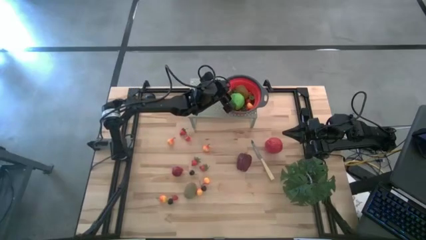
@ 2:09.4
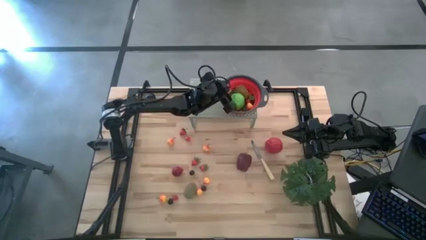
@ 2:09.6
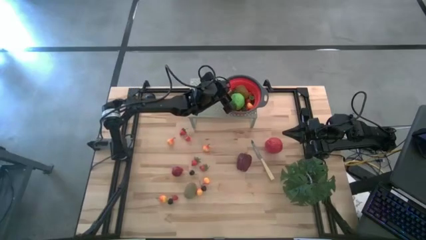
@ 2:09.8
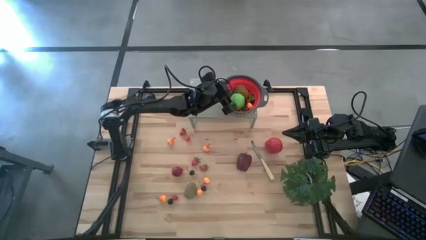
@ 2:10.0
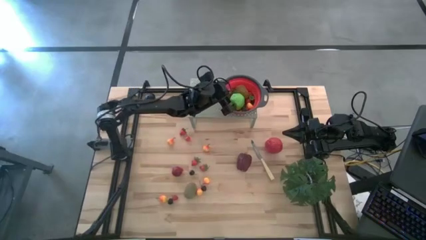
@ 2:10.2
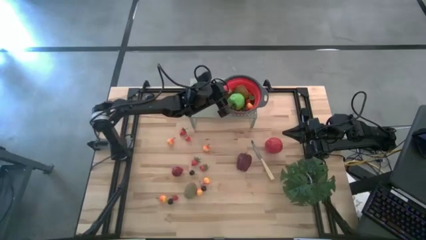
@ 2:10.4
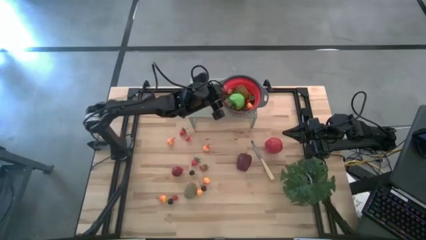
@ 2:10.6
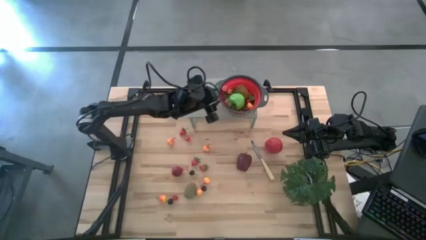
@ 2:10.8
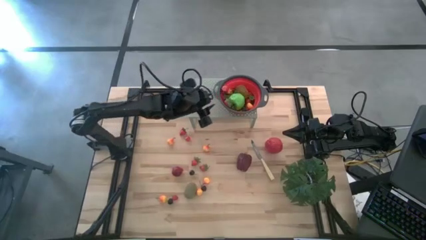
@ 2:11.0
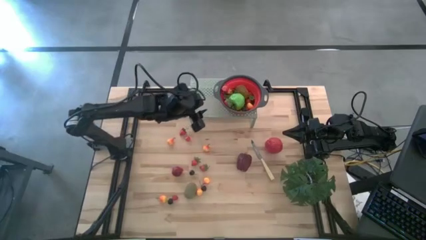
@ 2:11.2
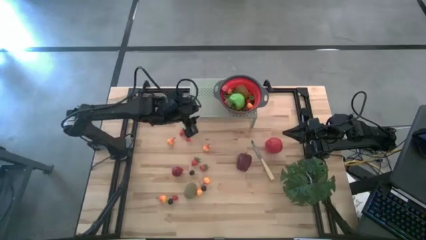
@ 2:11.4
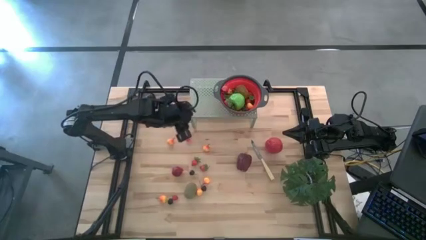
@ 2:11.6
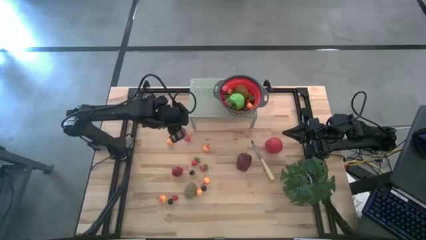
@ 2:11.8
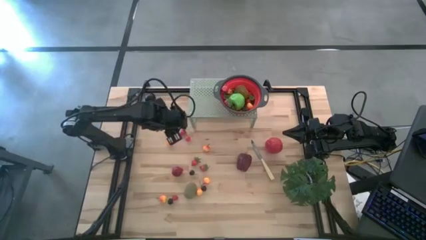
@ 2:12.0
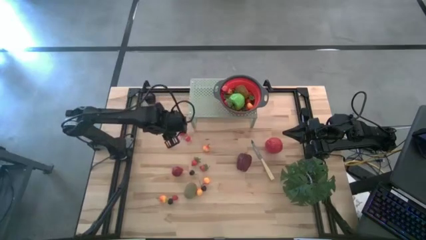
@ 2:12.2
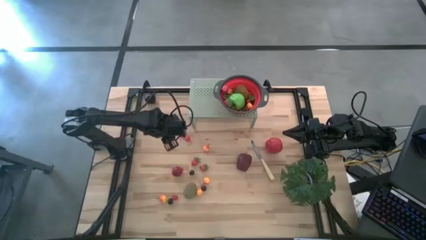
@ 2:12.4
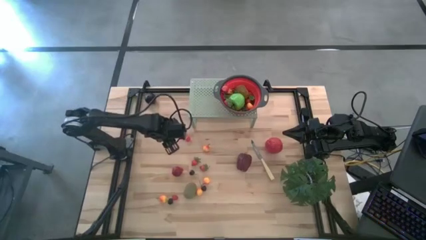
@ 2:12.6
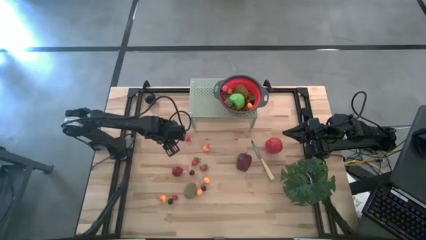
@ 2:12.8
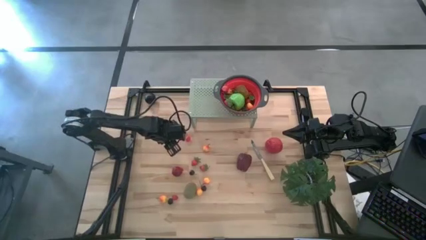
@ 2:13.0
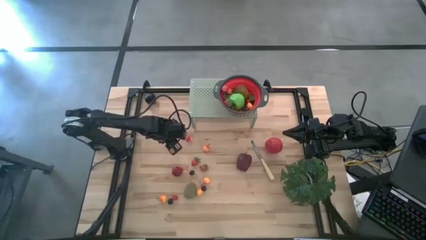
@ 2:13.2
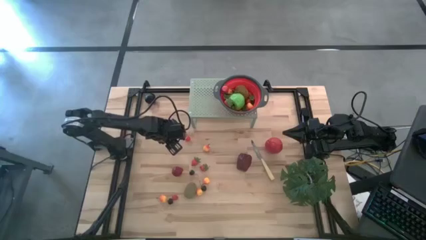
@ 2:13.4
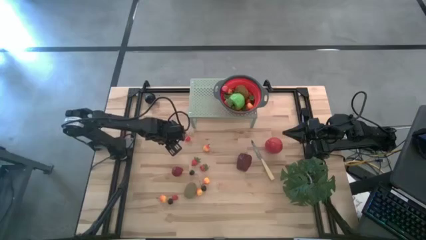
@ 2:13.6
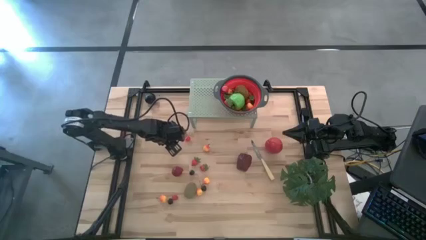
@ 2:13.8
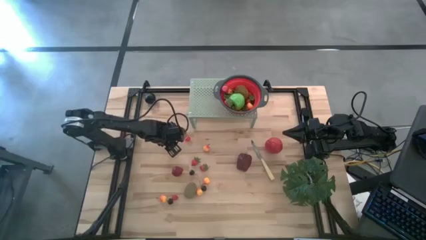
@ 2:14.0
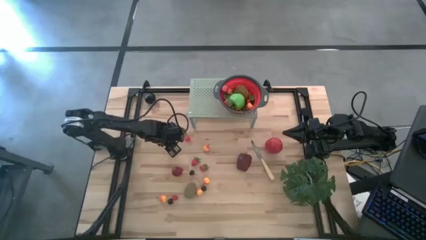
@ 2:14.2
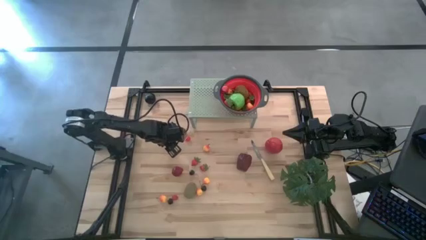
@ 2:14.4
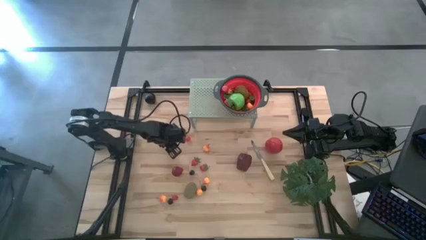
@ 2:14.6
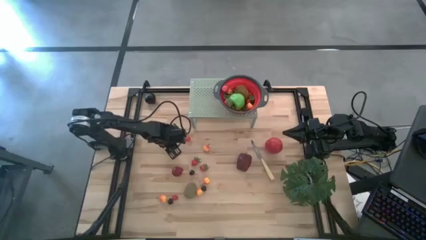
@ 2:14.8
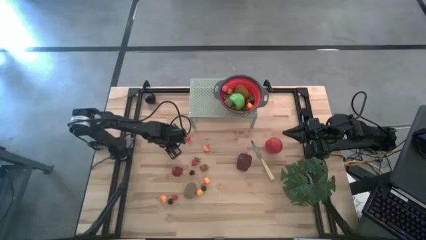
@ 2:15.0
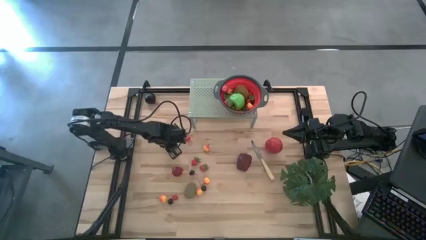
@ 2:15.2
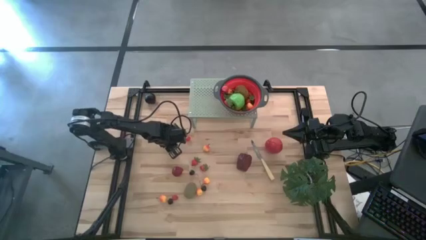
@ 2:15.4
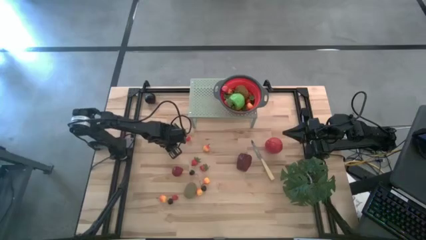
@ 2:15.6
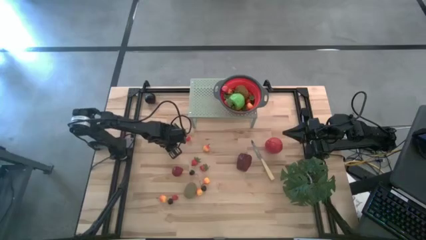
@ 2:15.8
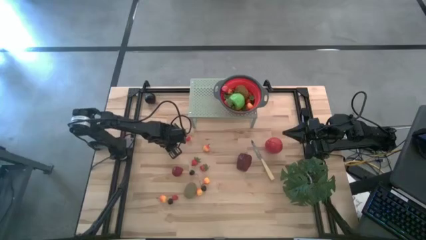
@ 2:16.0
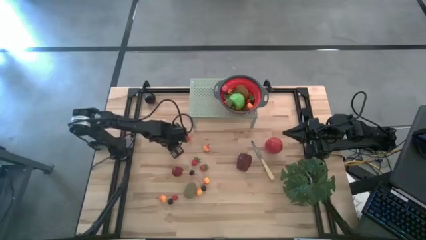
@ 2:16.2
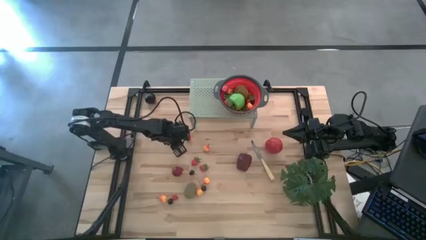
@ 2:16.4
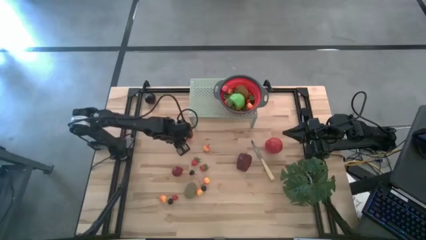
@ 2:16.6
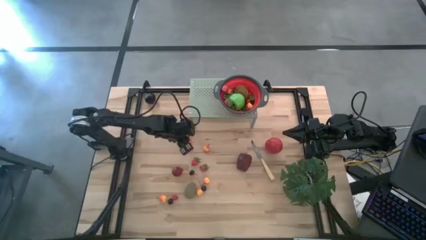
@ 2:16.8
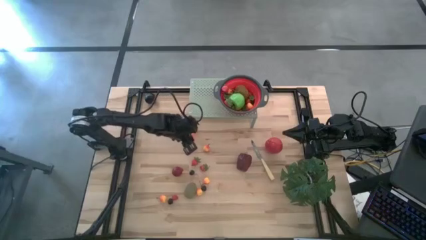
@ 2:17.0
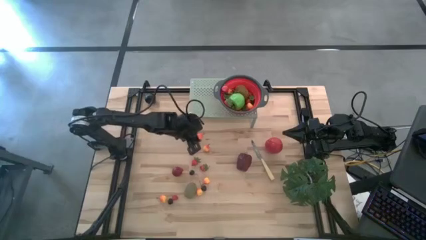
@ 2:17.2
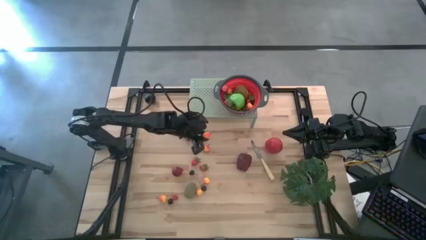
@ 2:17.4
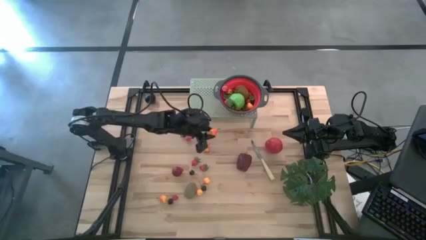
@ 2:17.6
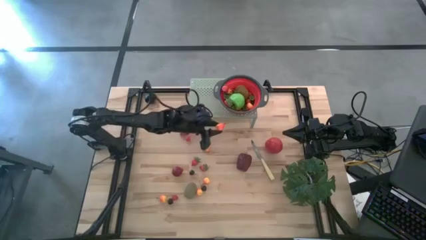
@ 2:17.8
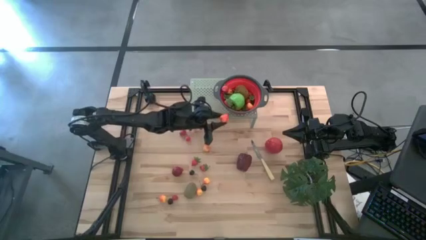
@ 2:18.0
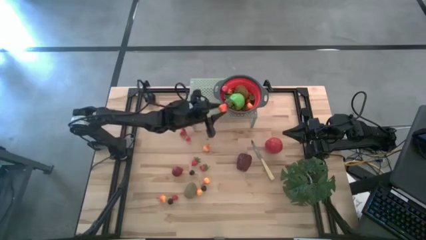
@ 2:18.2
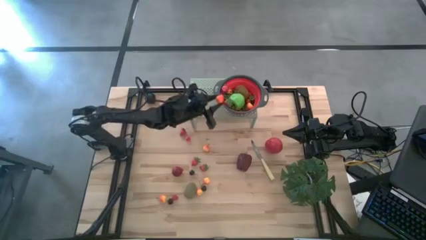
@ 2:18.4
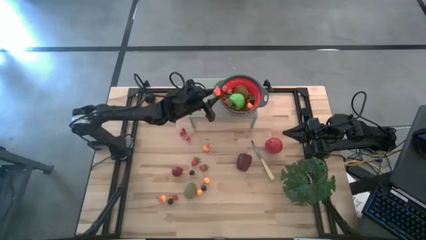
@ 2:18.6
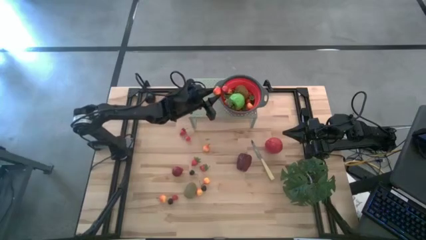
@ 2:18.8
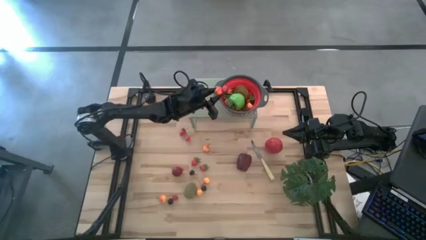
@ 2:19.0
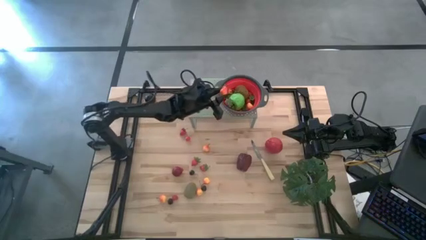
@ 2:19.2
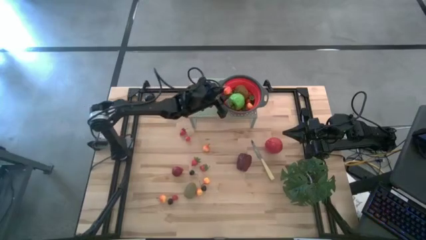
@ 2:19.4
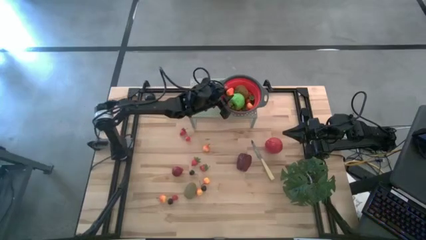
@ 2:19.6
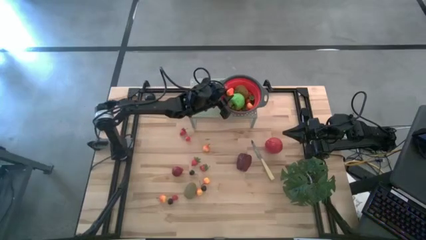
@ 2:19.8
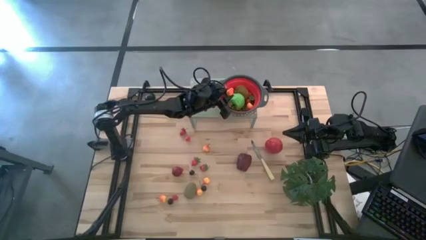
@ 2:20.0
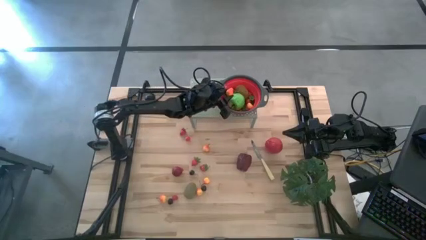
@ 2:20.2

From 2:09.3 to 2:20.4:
Task: Pick & Place Fruit
Put the orange peach into the black strainer bowl on the shelf

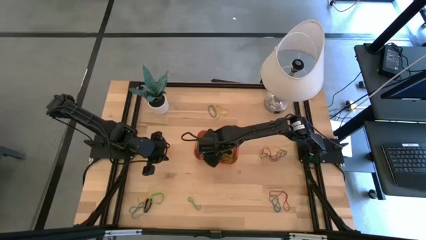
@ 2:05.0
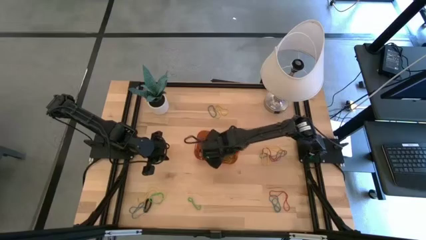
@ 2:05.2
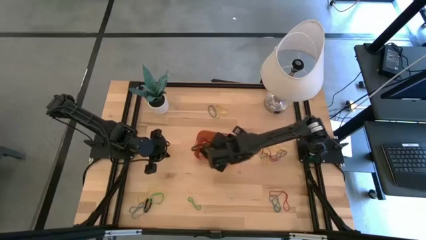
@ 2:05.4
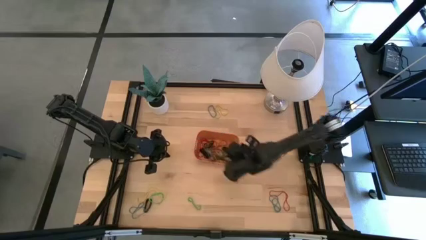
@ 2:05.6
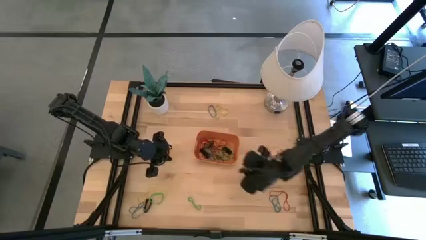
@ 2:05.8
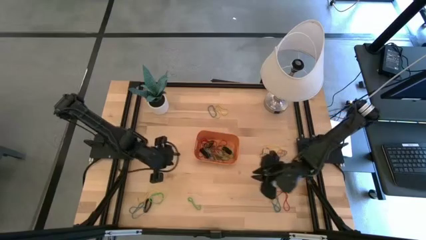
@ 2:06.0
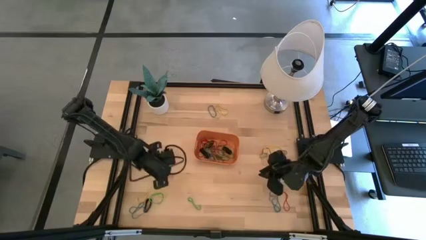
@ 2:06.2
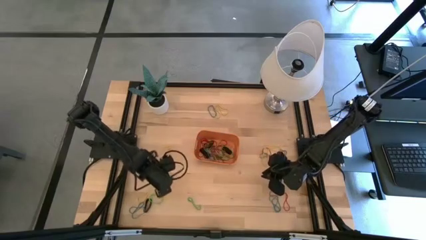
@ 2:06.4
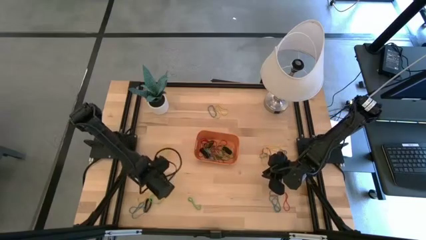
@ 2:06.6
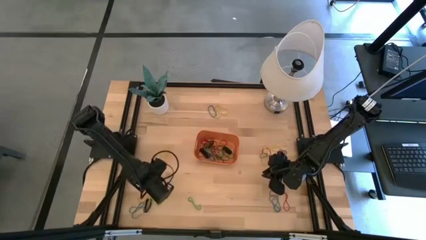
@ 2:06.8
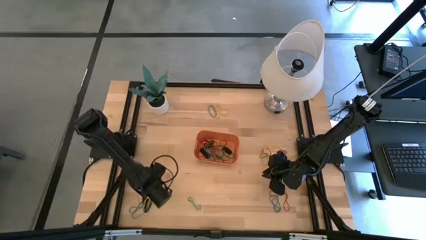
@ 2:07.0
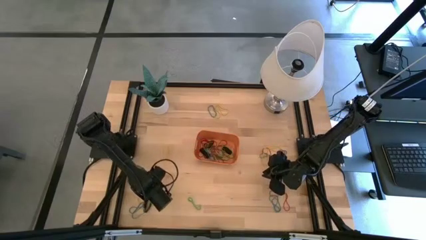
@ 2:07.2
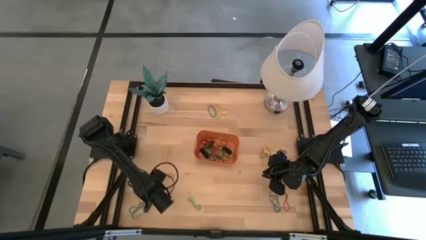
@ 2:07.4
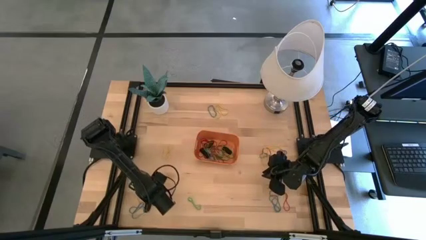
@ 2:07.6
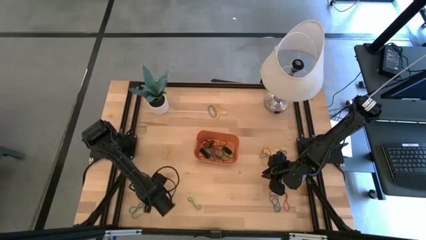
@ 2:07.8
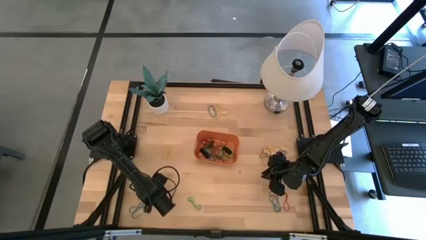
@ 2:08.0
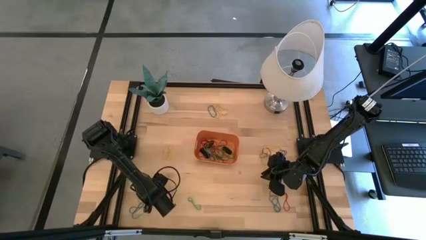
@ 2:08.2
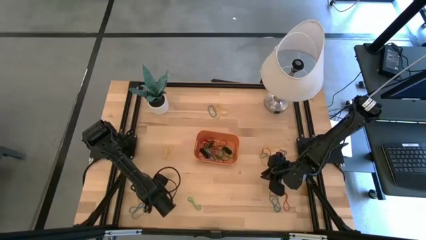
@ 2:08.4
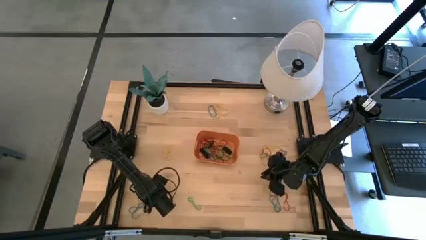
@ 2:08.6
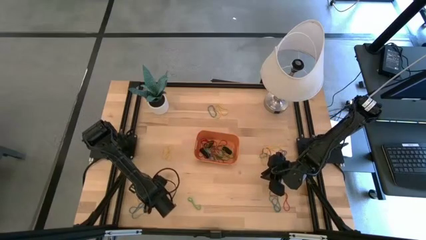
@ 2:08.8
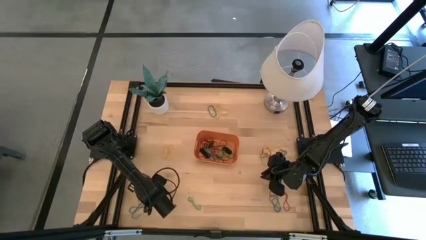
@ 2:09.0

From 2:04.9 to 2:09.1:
Task: Pick and place rubber bands into bin
Put the green rubber band into the orange bin

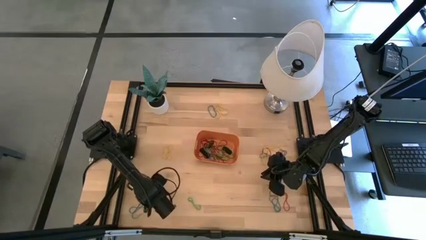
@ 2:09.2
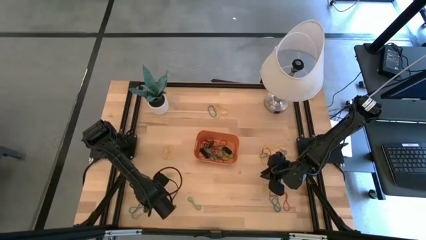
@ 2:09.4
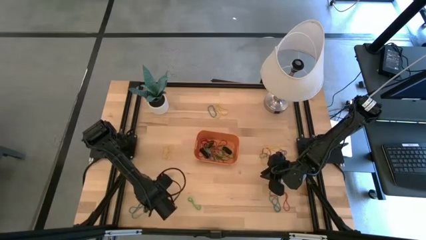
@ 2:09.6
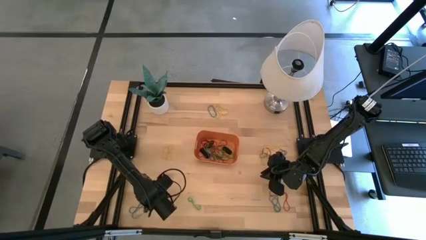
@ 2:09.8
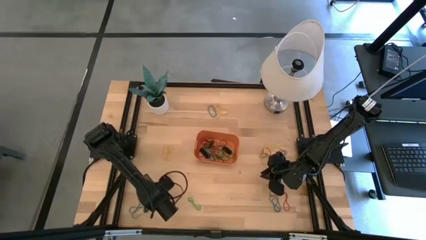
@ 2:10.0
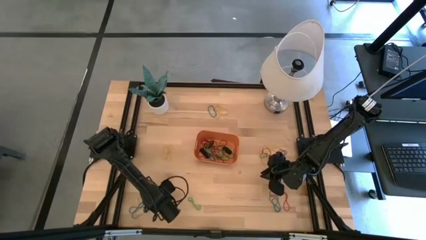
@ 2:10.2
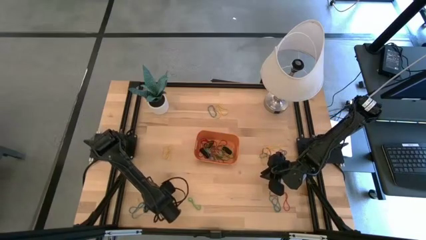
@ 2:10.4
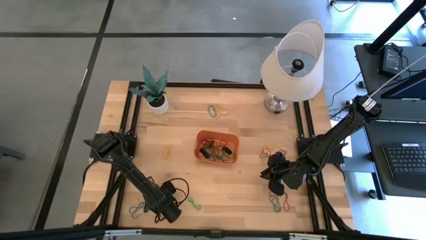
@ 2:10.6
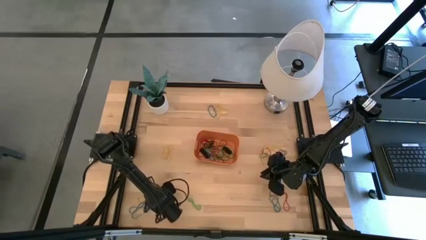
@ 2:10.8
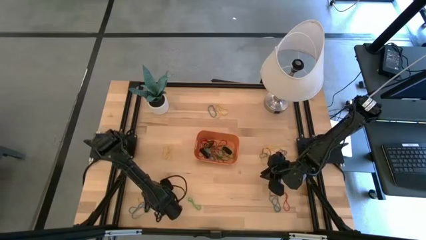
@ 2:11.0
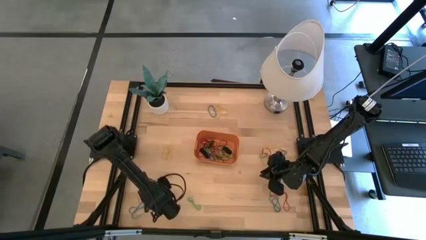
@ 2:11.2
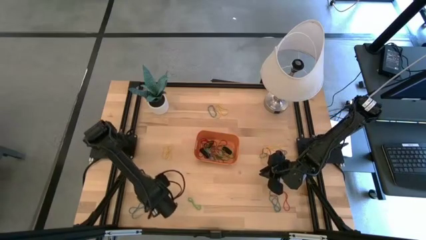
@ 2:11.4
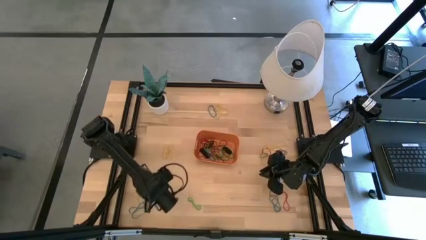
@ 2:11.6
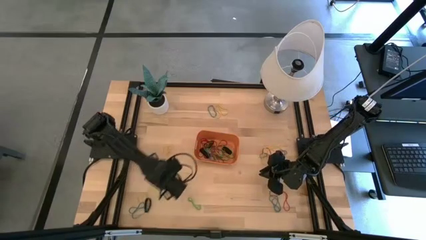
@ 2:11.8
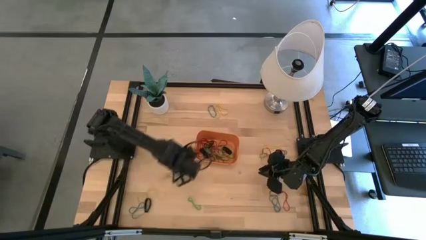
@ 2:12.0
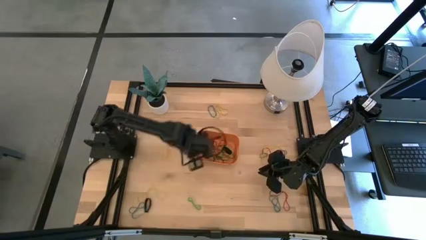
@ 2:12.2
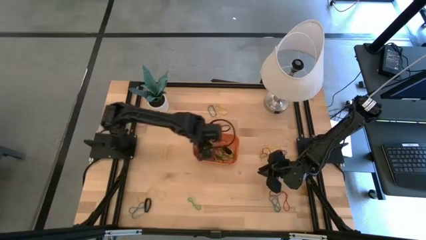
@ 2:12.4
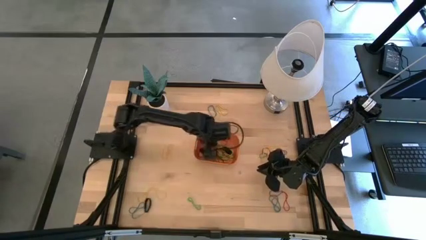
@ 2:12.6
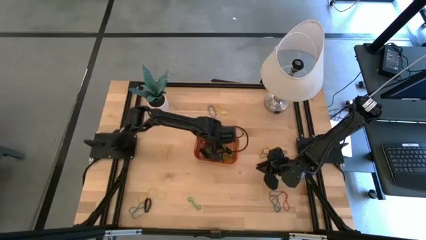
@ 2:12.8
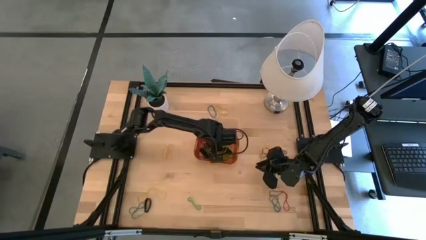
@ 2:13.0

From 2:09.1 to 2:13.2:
Put the green rubber band into the orange bin
